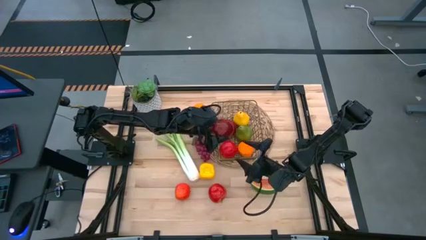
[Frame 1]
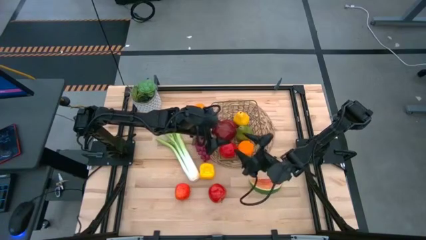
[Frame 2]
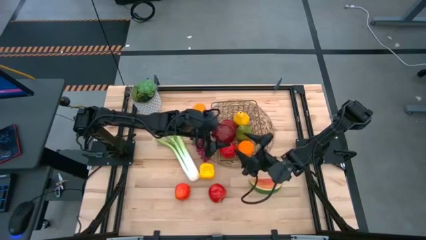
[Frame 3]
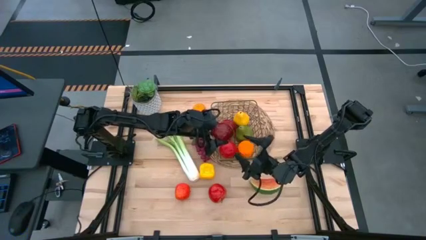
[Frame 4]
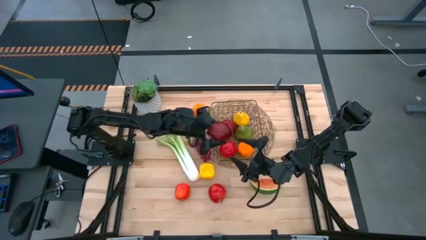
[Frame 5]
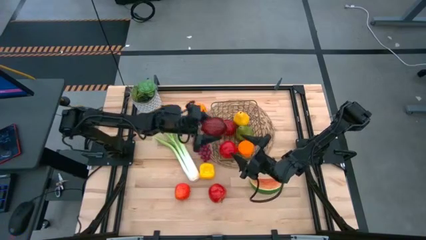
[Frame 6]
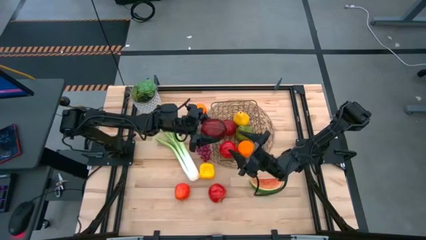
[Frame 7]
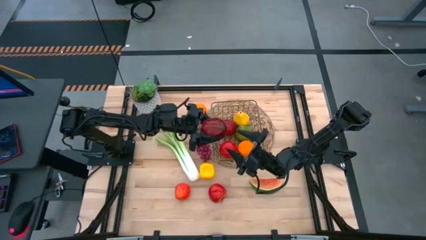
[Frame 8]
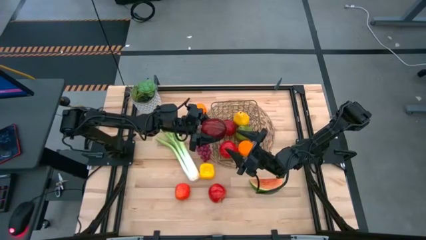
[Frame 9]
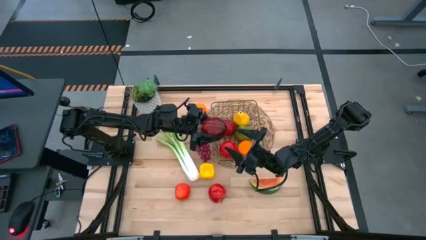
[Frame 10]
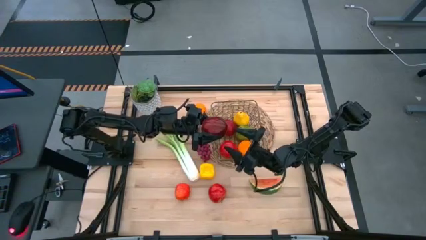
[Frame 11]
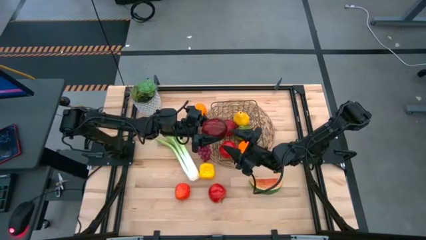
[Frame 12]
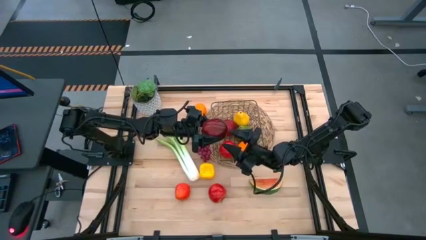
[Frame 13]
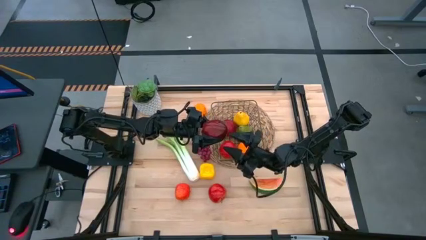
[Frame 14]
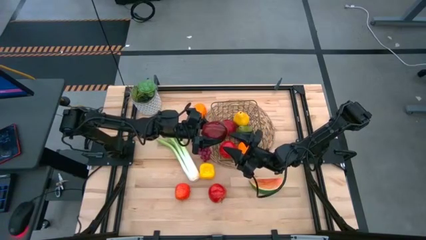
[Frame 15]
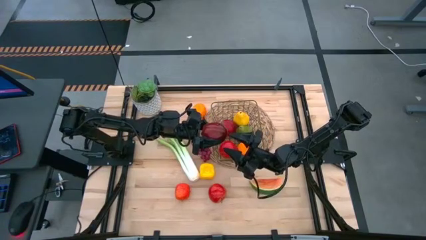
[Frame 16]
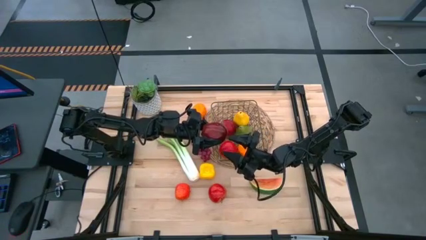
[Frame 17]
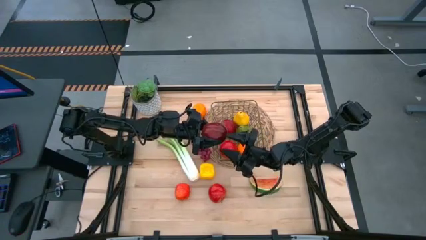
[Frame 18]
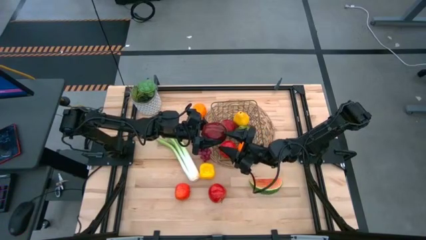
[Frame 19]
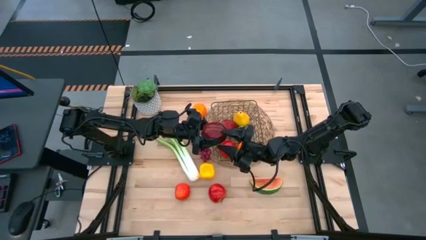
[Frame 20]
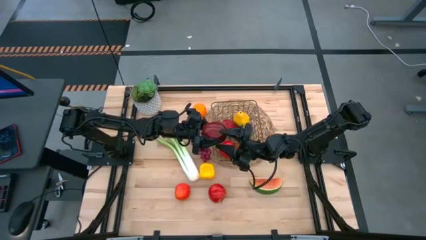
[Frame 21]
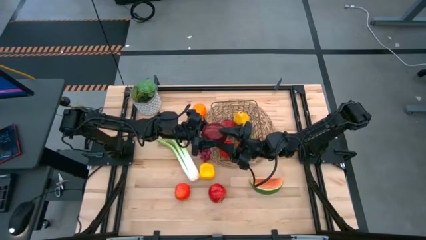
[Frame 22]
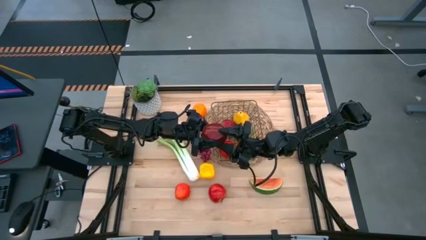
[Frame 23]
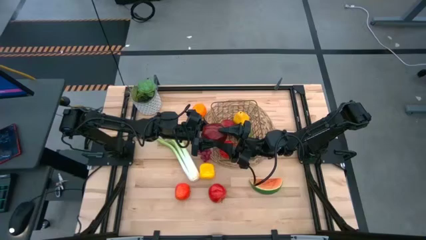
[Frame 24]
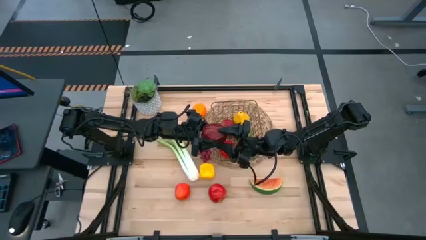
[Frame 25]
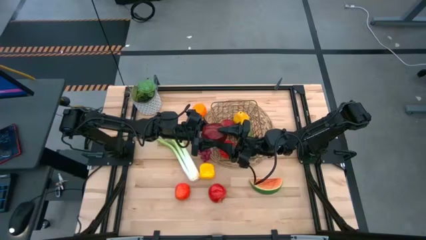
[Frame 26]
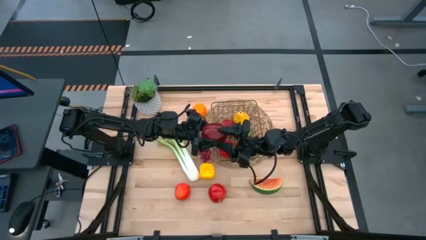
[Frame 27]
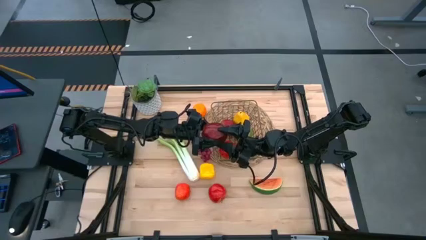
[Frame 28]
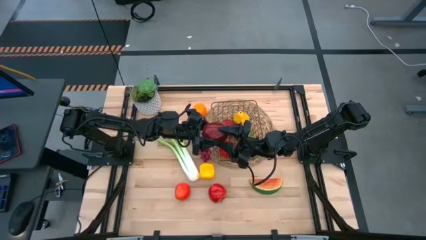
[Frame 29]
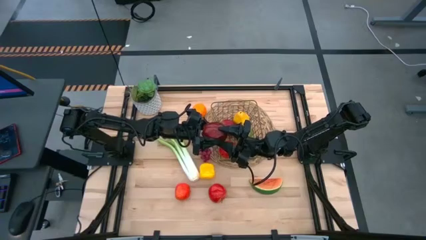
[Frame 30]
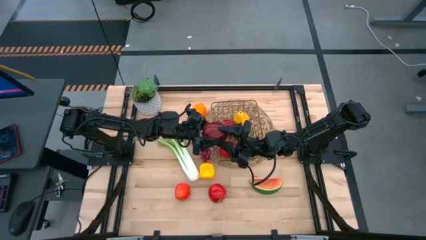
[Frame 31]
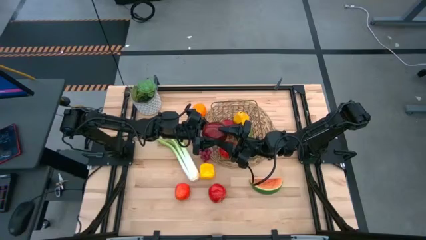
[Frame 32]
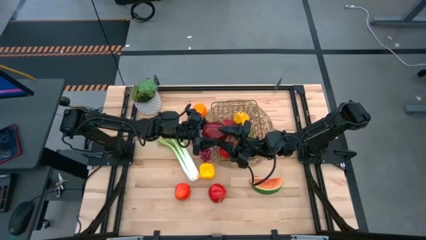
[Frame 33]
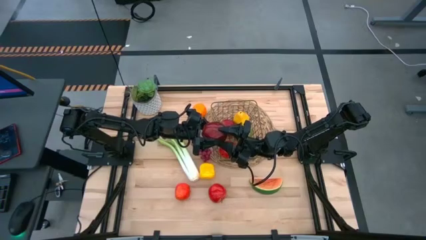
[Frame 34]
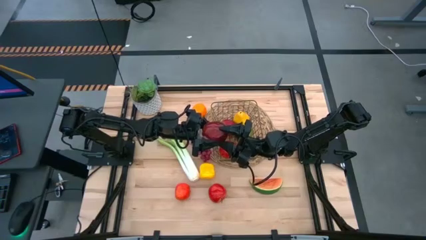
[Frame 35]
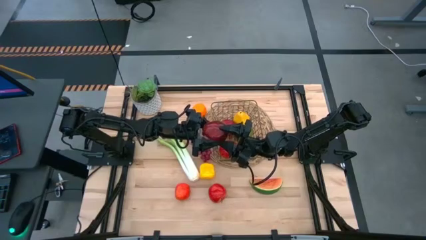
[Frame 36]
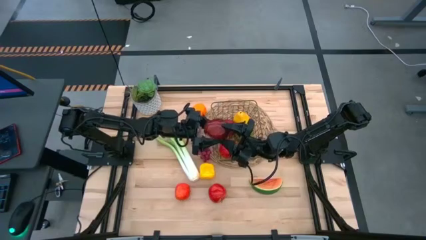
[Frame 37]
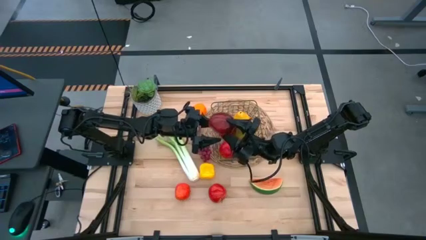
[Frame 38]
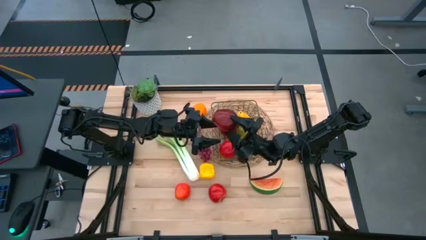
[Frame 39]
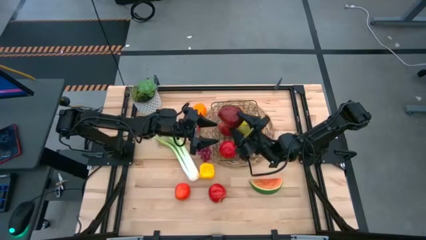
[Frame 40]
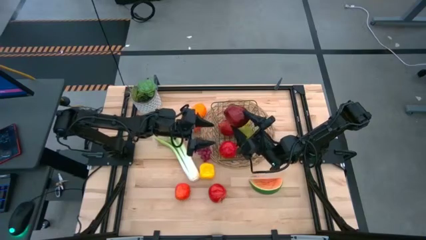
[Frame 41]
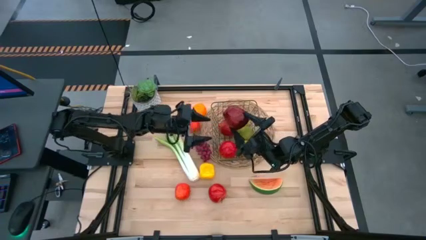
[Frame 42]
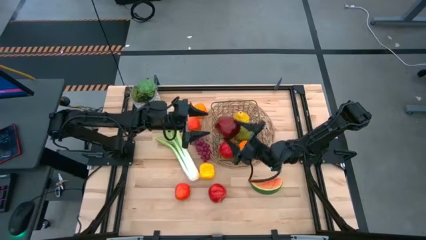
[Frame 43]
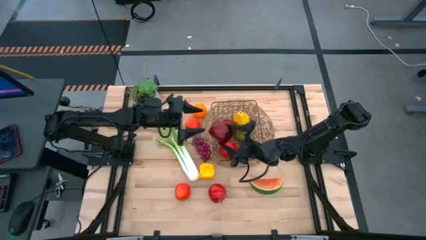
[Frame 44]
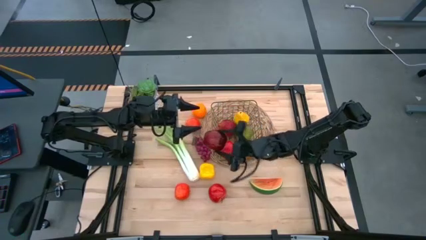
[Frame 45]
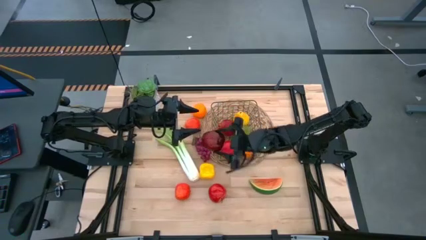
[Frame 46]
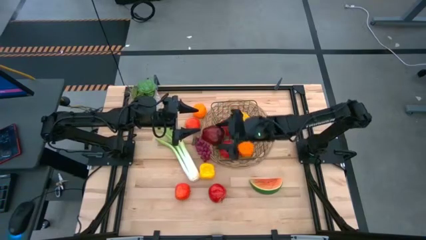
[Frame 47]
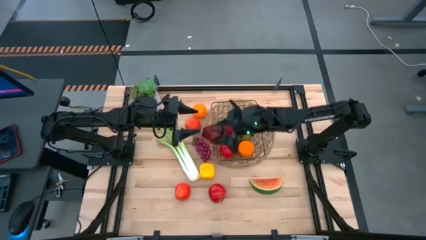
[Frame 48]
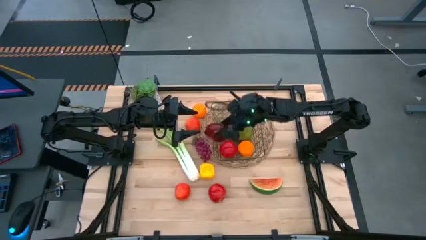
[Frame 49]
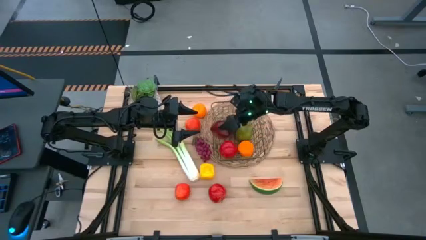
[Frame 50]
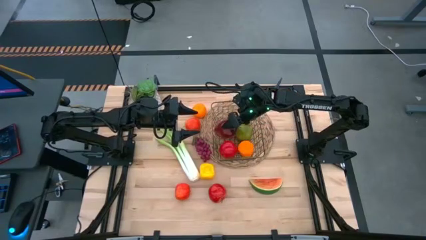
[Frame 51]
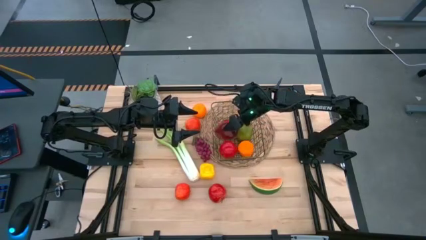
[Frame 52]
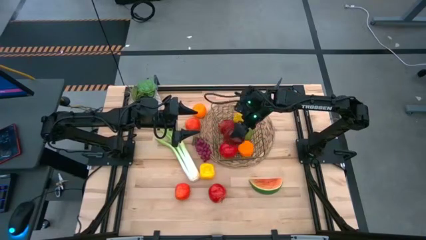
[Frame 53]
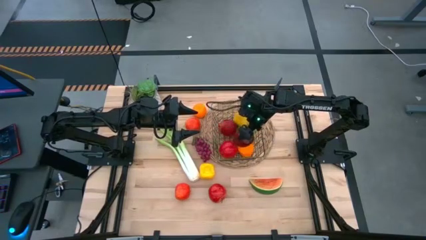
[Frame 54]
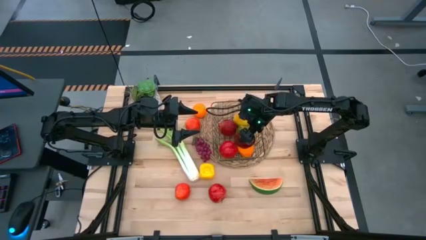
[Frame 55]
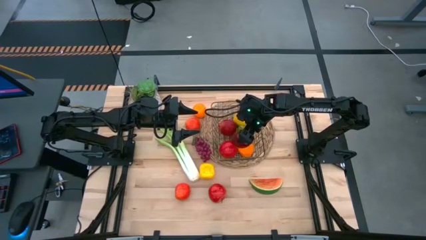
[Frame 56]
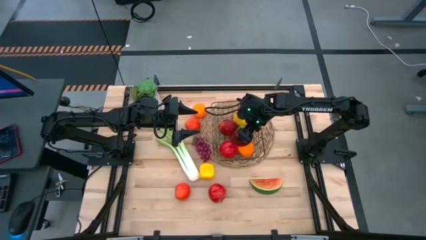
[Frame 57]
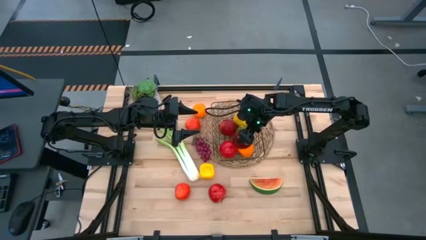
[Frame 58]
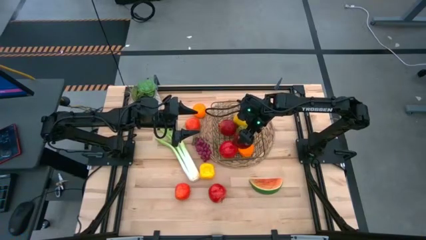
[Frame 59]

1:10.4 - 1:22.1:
Task: Build produce basket
Put the apple into the wire basket

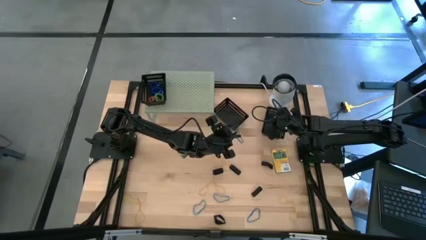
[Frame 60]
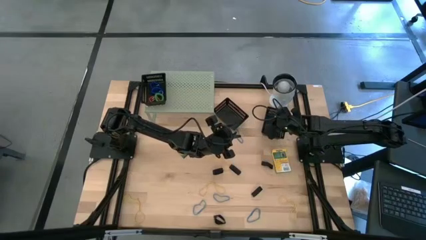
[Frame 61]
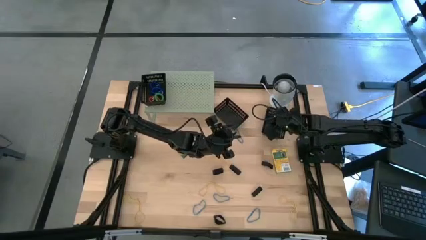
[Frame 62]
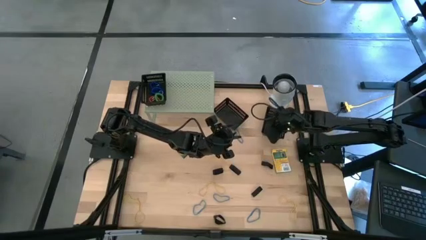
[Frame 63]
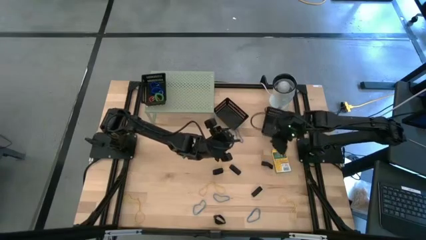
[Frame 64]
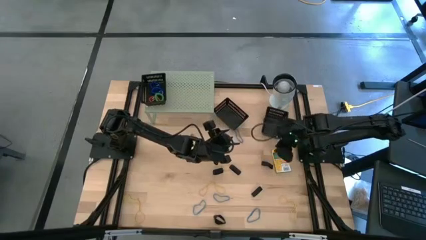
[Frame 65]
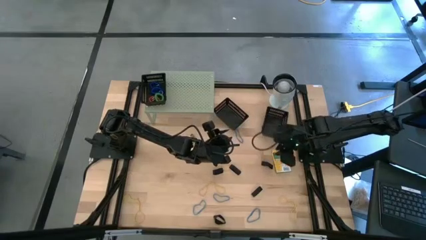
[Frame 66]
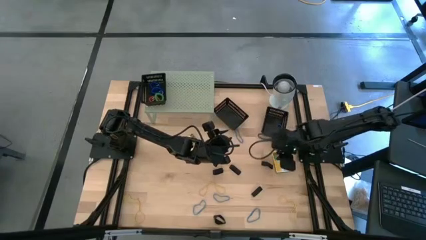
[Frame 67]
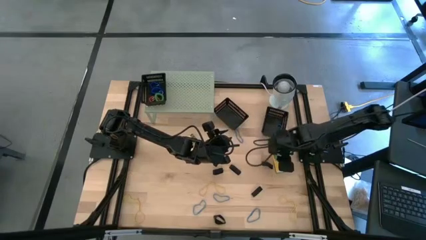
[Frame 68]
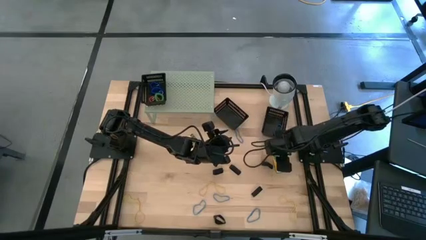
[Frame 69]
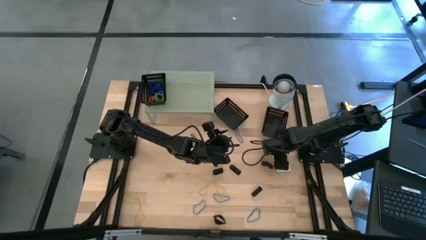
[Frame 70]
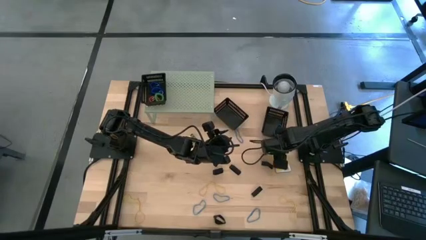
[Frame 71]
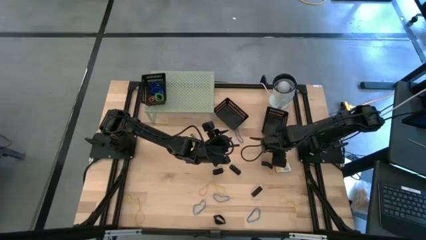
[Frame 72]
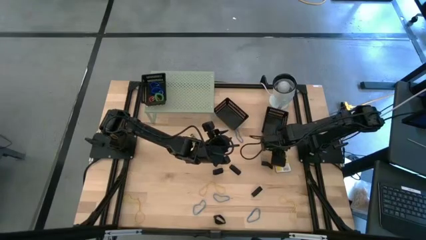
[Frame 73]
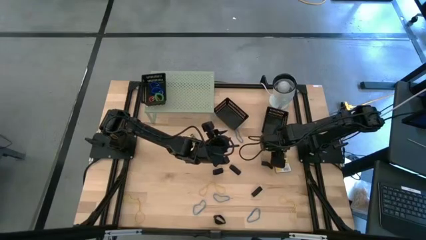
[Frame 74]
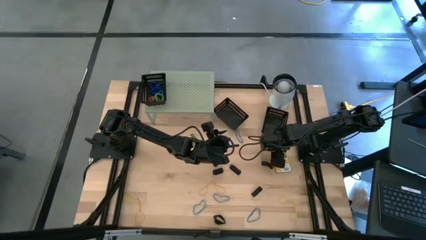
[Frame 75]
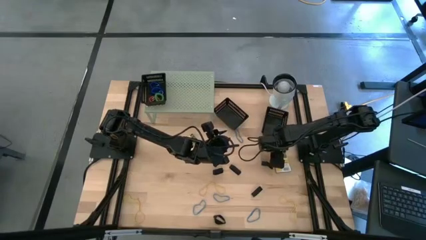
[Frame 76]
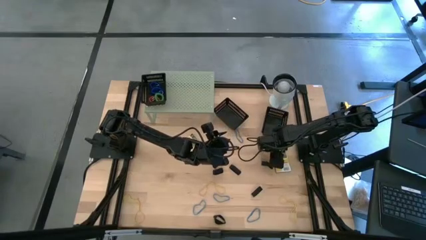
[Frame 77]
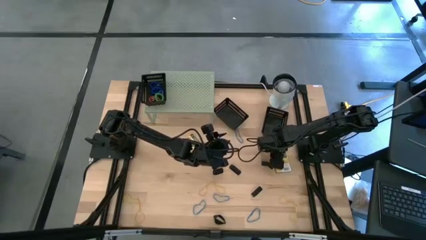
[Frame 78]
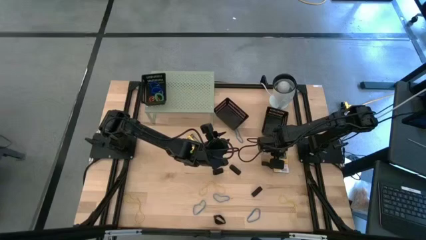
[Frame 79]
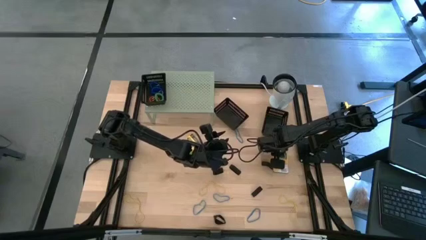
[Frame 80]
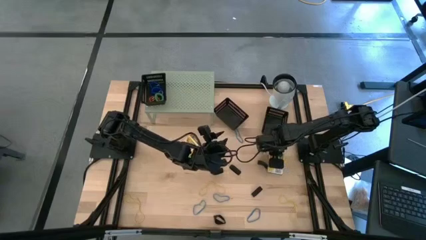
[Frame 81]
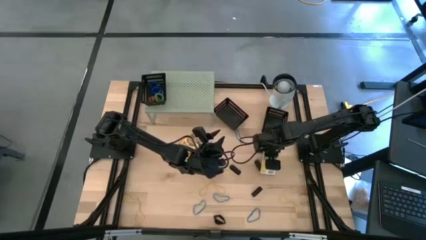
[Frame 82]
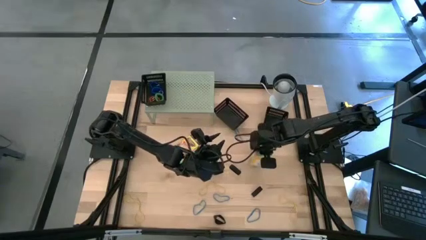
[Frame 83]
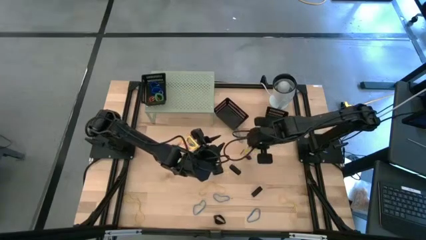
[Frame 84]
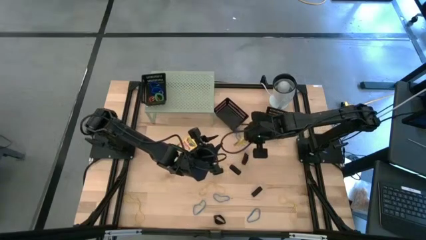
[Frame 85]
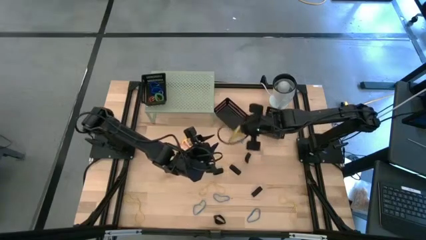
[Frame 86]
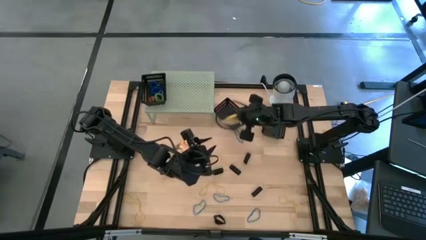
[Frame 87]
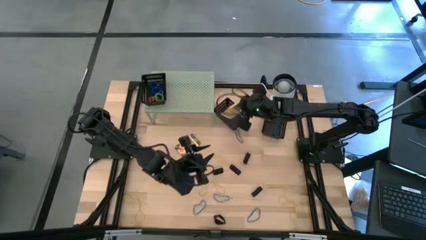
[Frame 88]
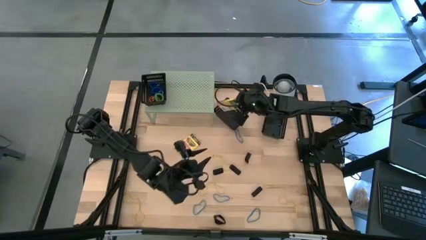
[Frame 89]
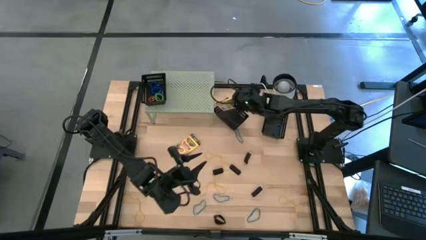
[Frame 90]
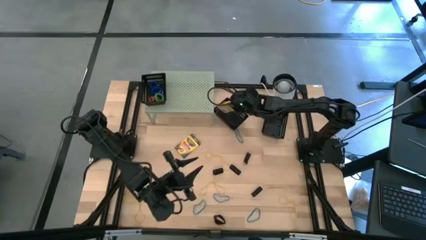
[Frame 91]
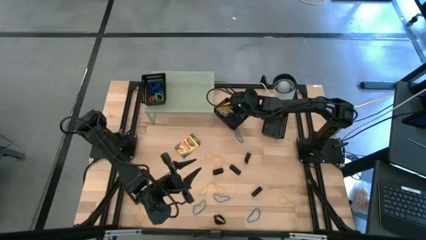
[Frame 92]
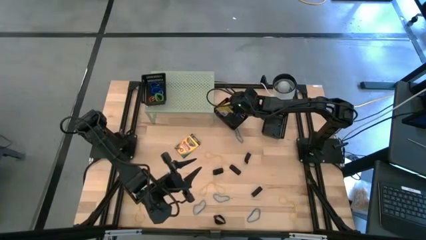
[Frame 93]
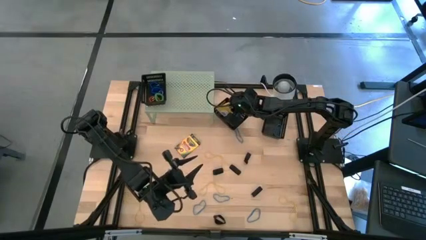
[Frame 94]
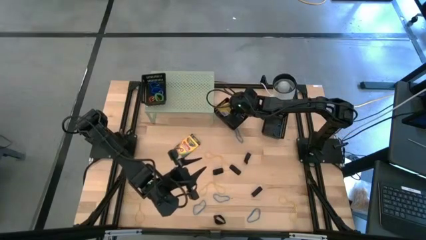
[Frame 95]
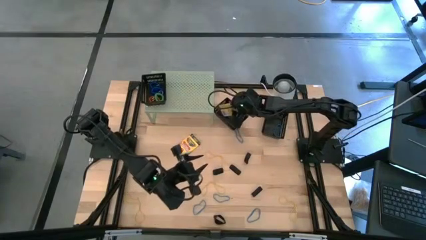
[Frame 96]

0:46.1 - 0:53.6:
Task: Pick & Place Office Desk Supplies
Put the yellow crayon box into the left black bin
